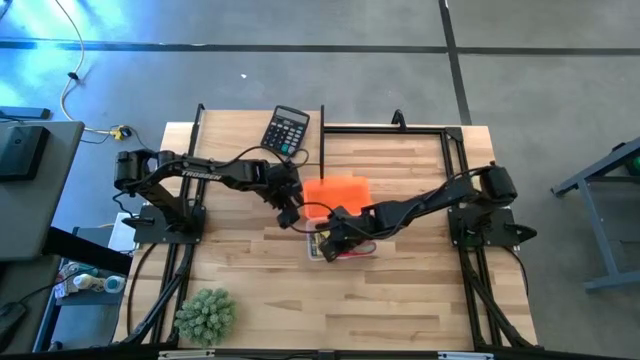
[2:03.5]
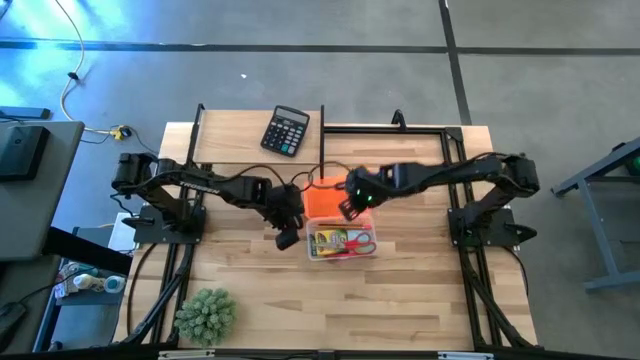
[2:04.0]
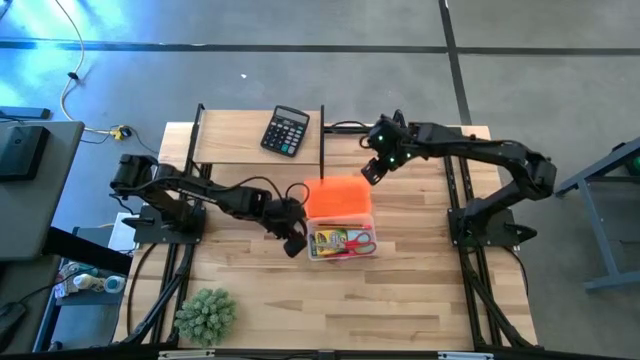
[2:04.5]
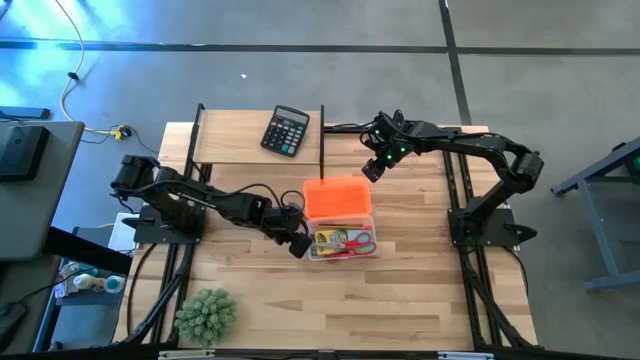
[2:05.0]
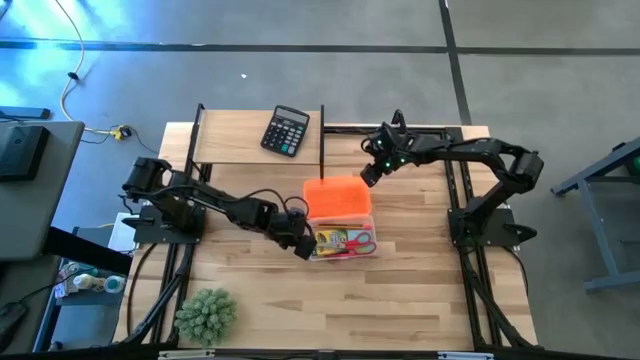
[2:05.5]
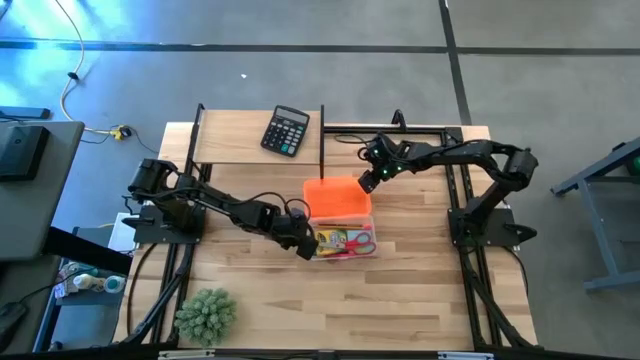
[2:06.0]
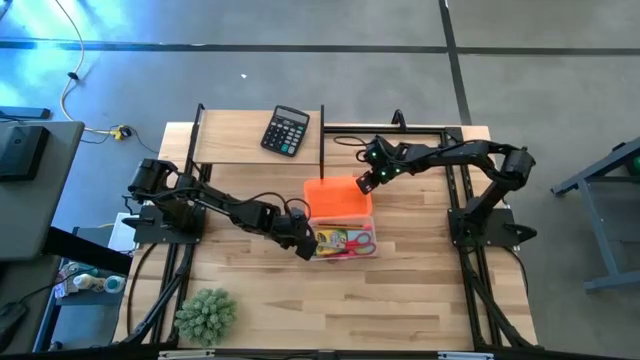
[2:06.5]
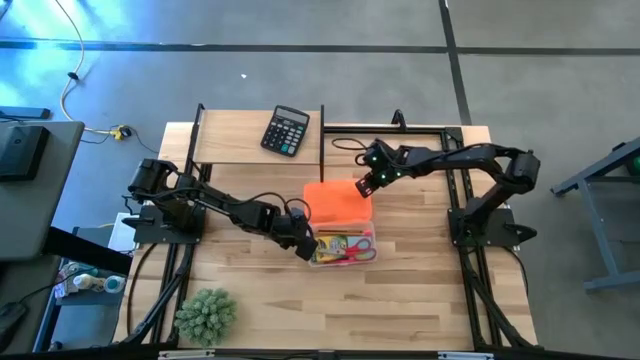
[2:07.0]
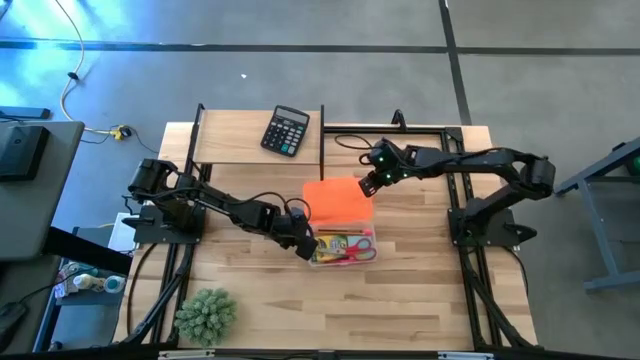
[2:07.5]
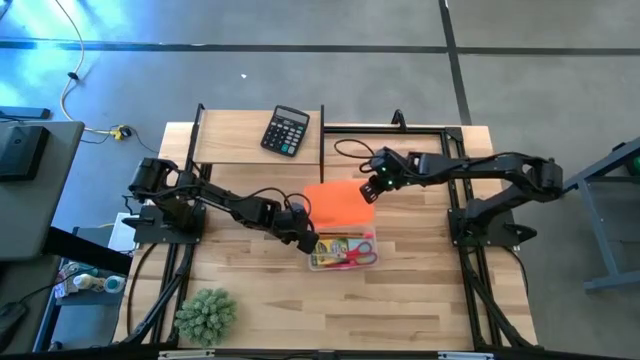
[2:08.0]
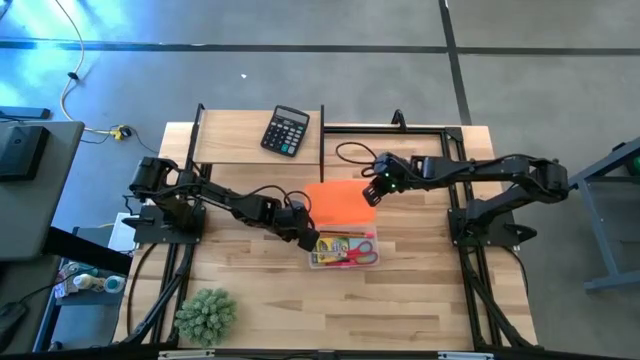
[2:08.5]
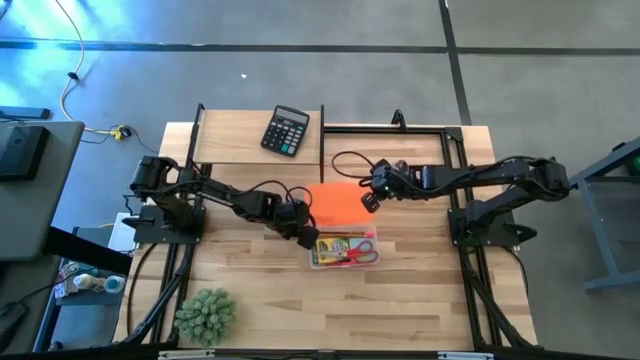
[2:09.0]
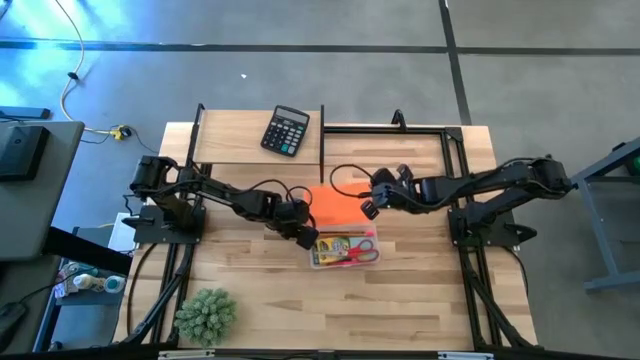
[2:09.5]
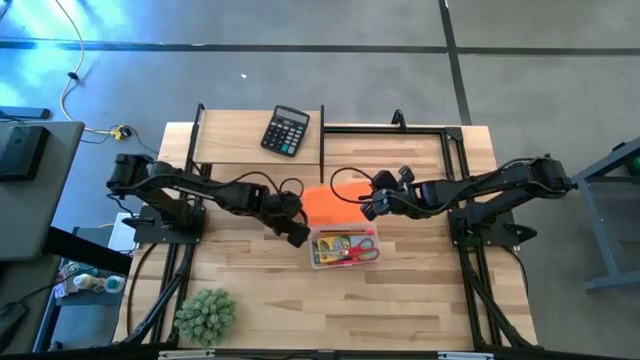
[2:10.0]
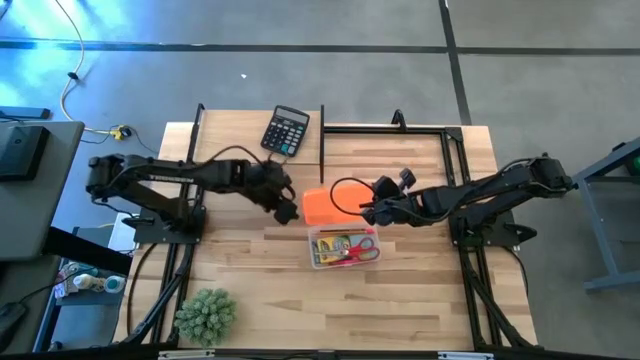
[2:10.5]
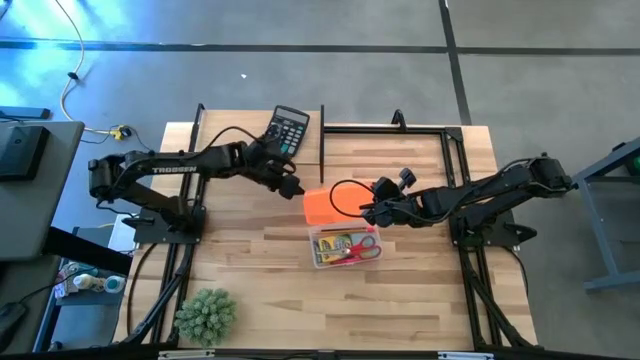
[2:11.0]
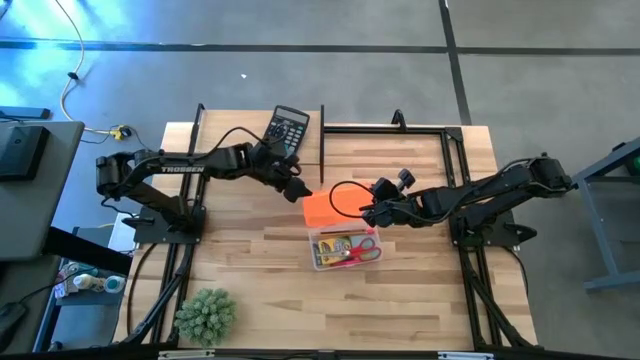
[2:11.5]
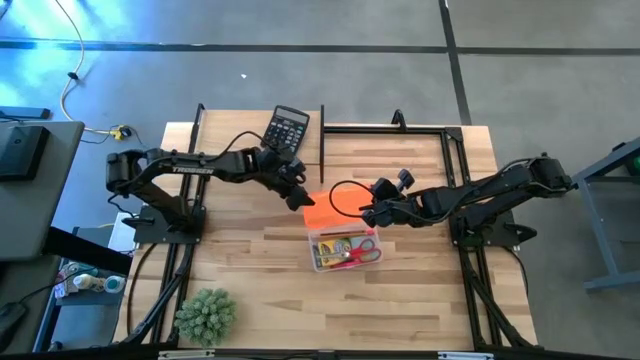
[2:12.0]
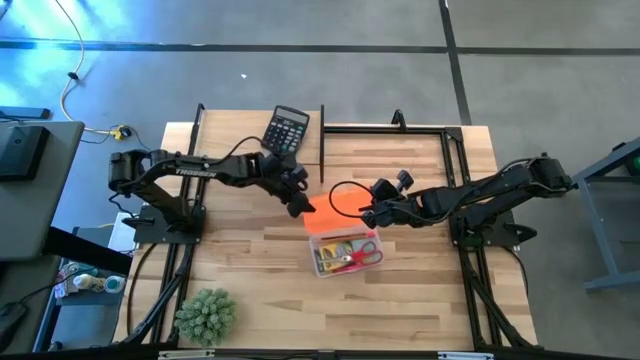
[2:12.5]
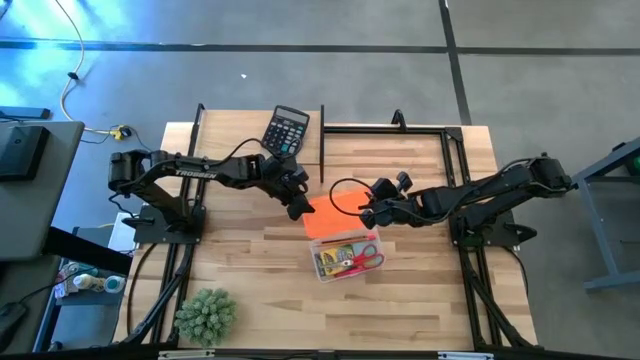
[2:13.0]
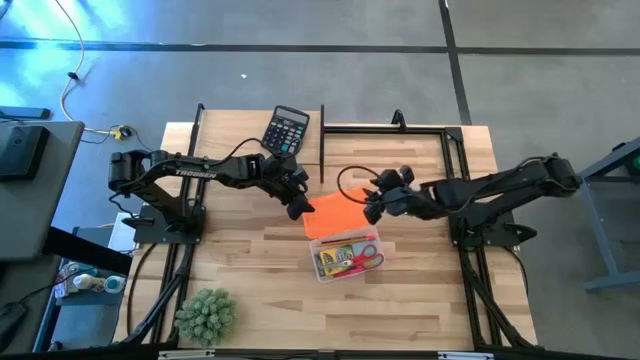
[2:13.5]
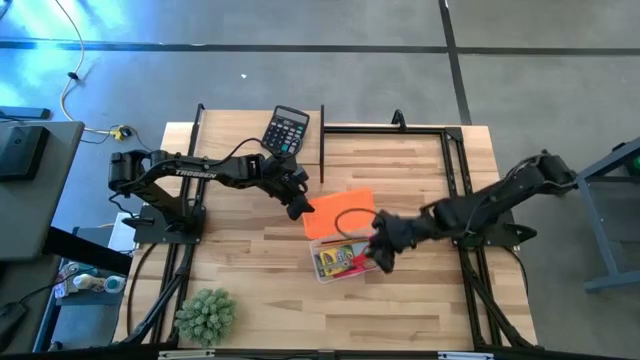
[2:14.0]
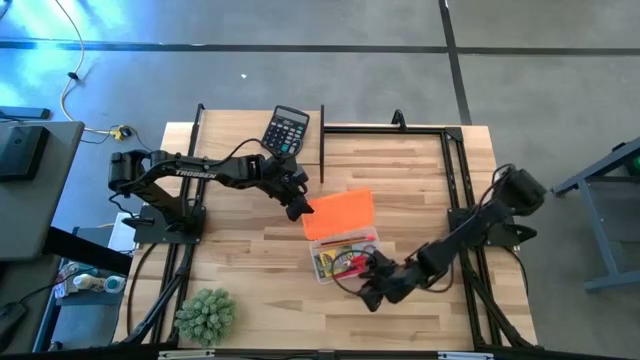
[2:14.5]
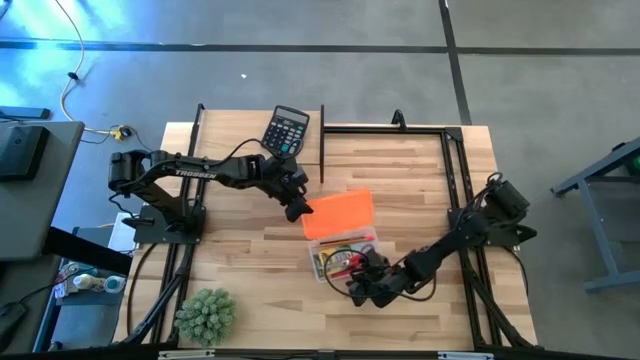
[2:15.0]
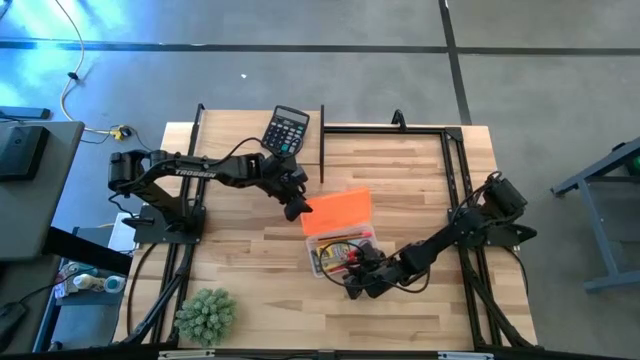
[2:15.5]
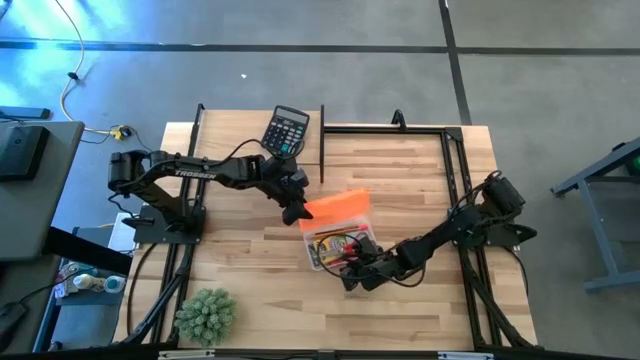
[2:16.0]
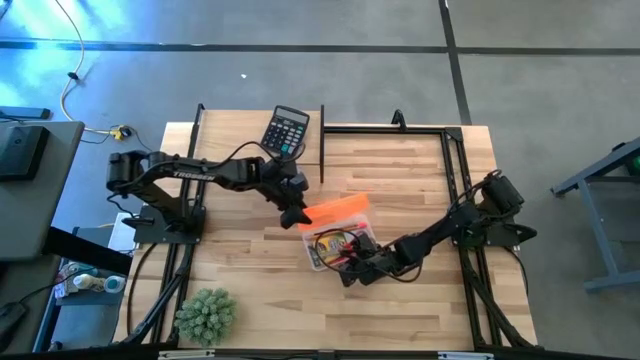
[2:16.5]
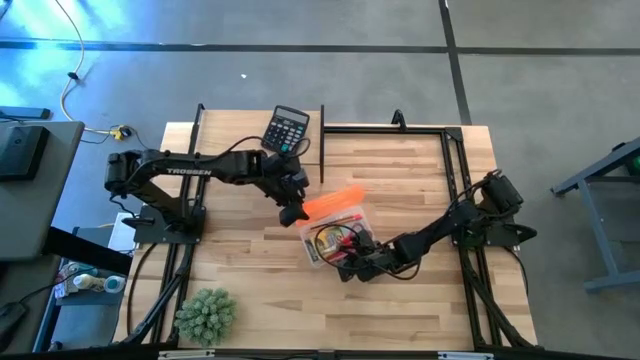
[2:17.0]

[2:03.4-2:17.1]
Task: Pack school essentials
Close the supply box

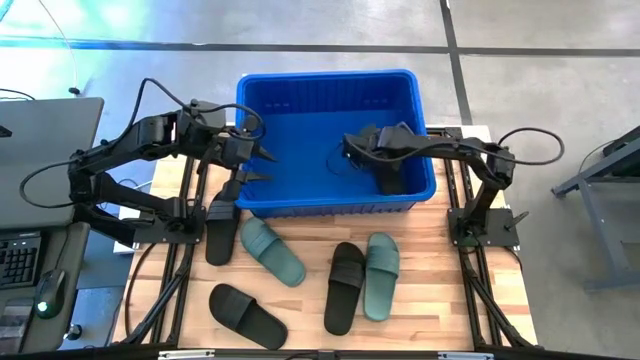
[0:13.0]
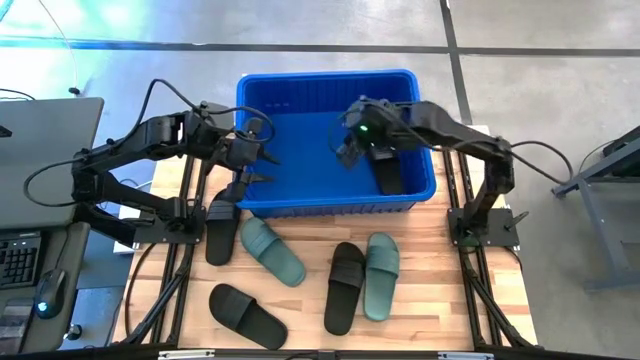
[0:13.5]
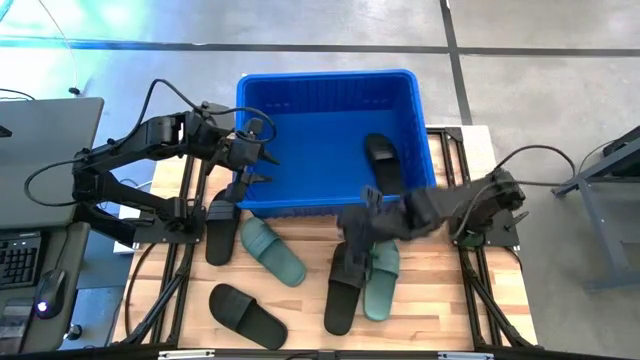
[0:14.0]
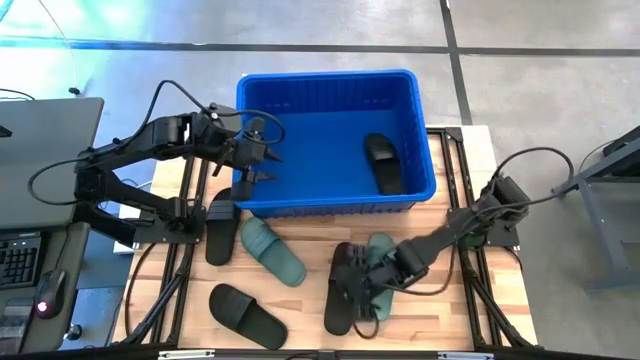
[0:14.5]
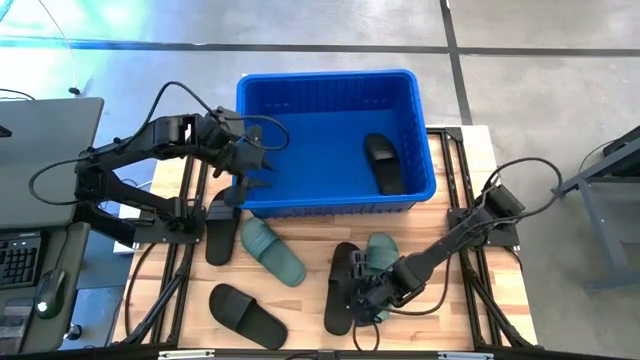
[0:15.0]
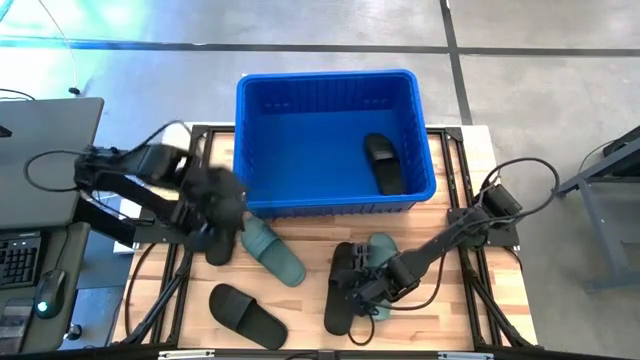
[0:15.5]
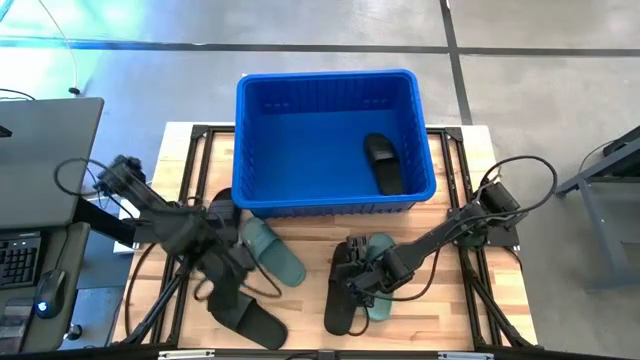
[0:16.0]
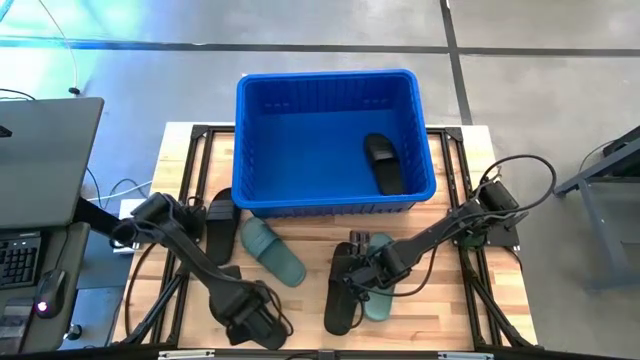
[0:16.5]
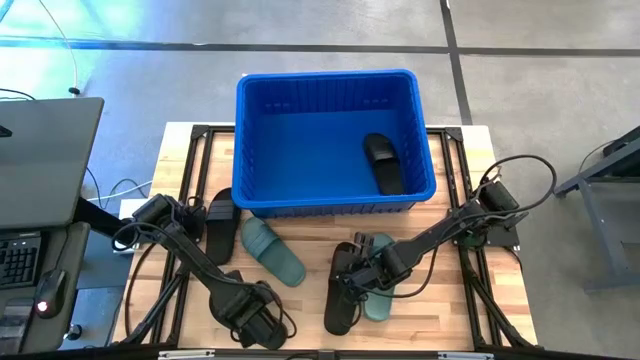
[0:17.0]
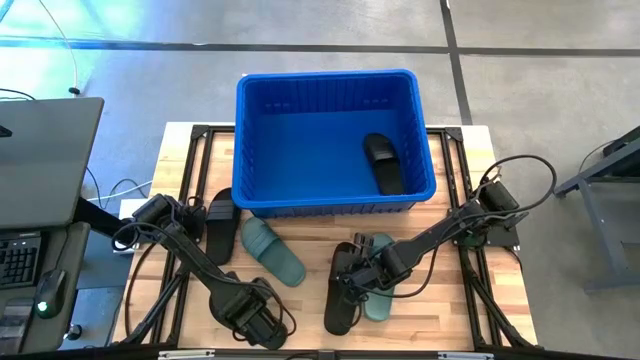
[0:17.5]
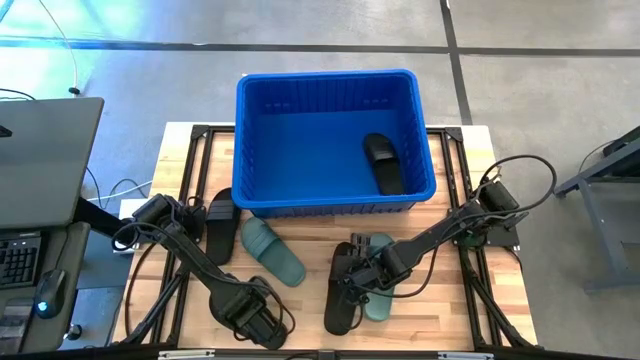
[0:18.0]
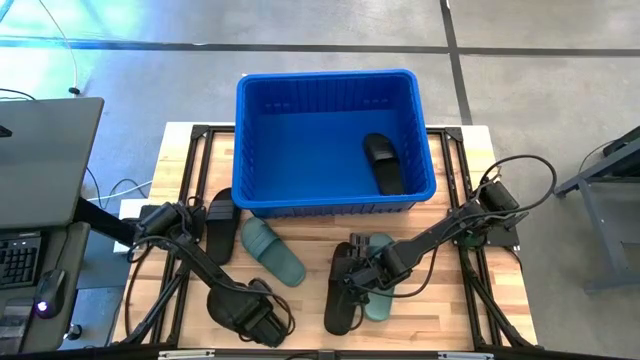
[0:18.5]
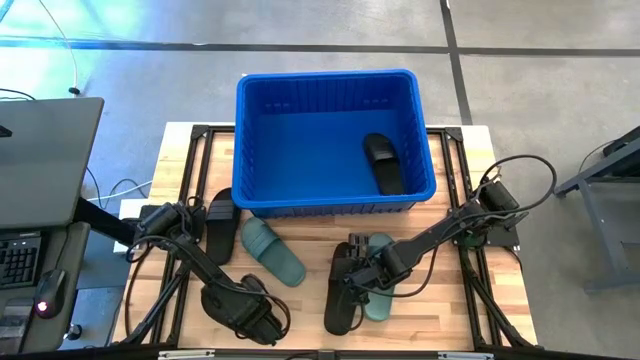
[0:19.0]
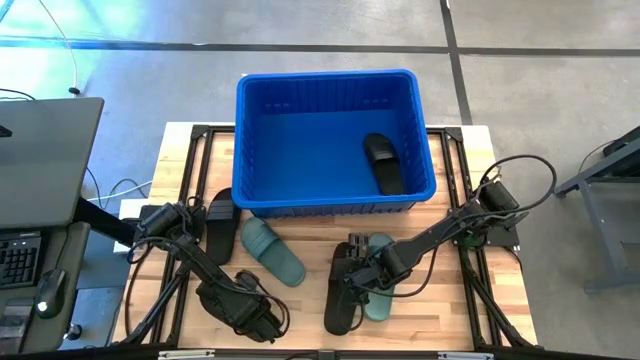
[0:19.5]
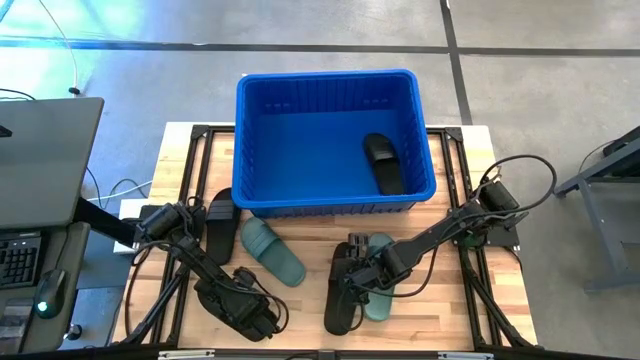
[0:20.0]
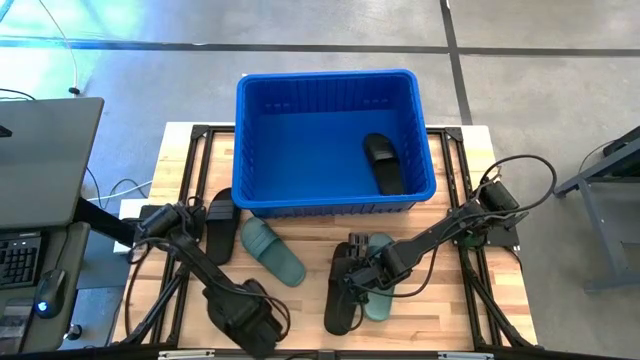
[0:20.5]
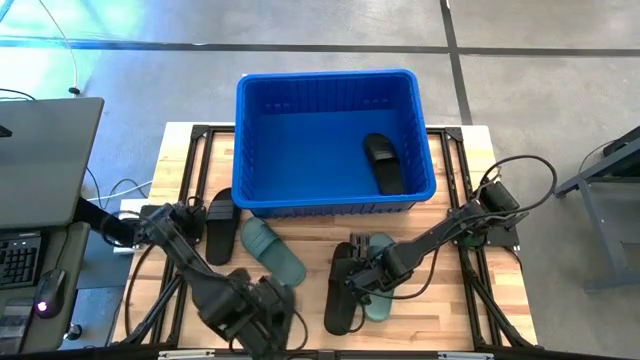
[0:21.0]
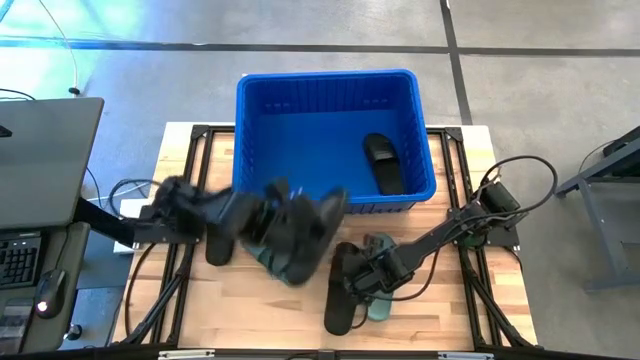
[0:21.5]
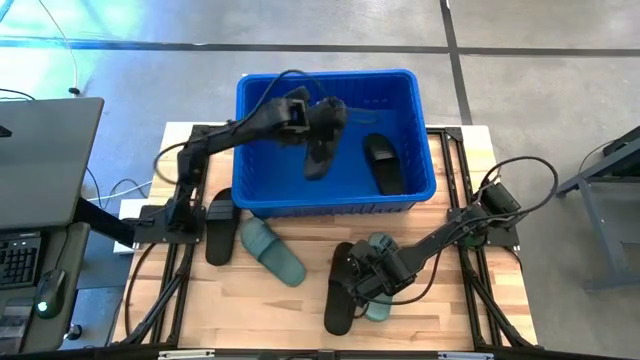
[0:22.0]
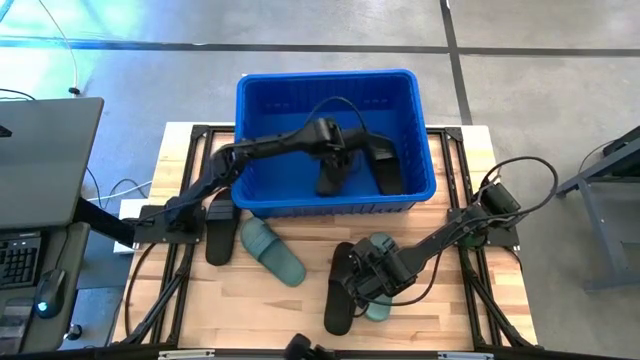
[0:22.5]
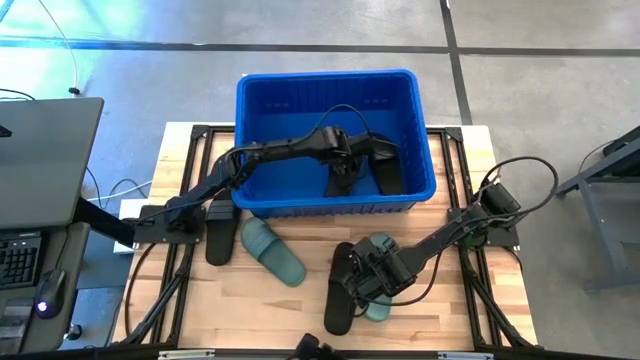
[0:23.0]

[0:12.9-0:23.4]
Task: Pick and place slides into bin
Put the black slide into the blue bin
